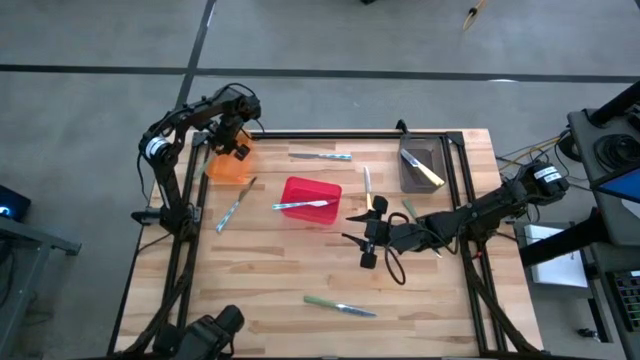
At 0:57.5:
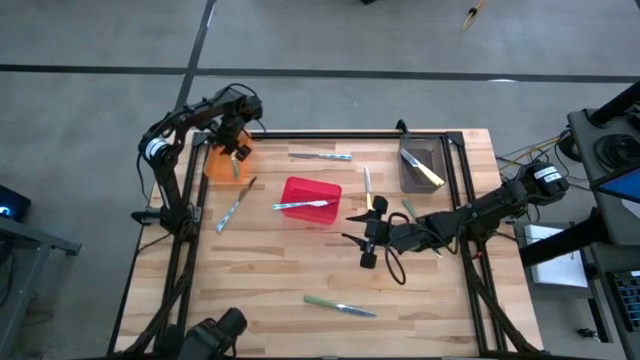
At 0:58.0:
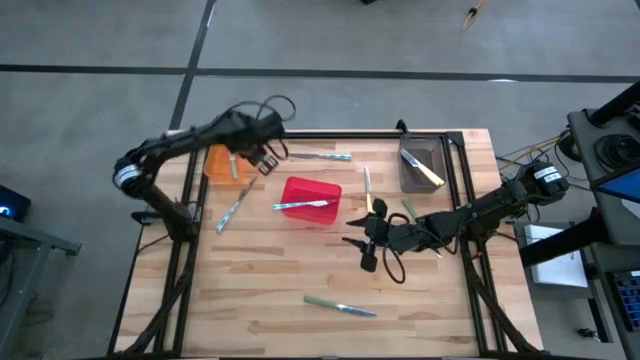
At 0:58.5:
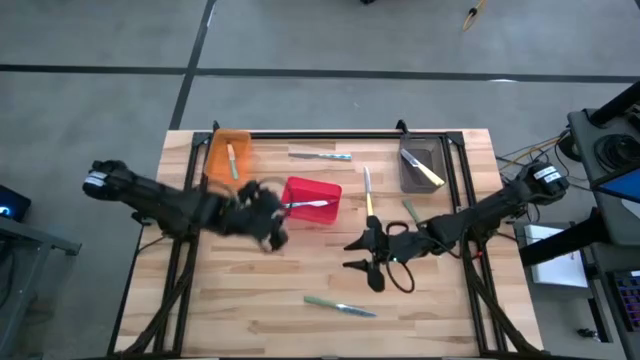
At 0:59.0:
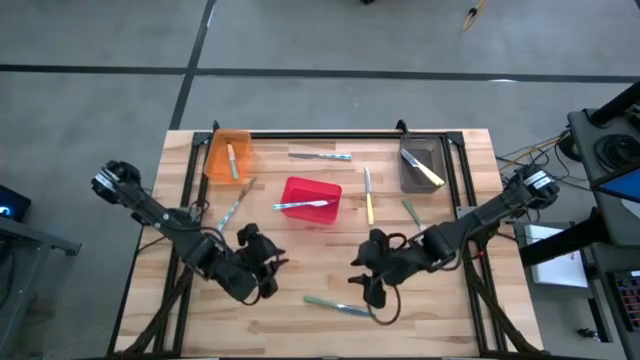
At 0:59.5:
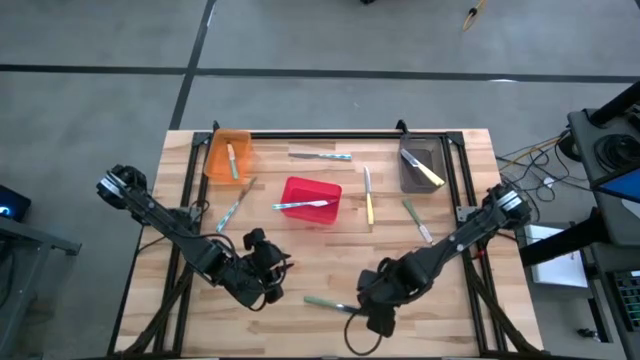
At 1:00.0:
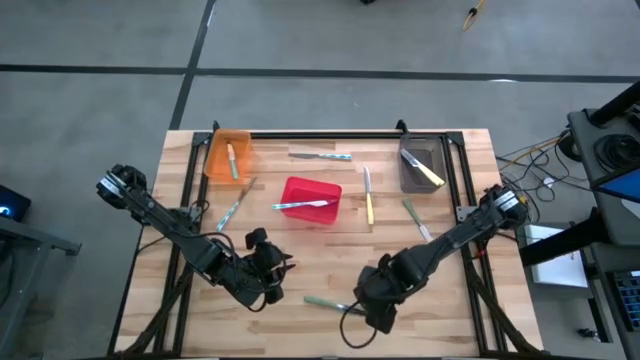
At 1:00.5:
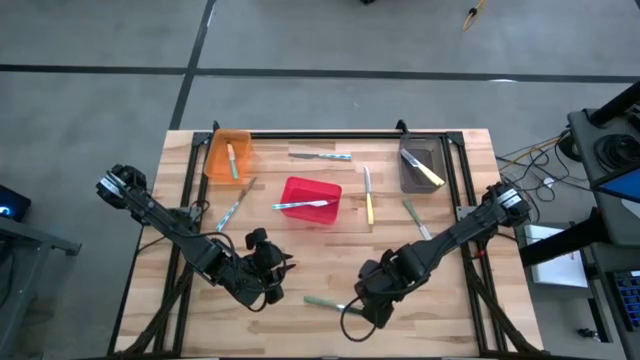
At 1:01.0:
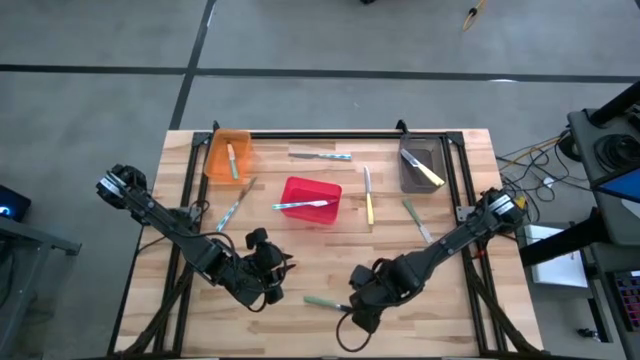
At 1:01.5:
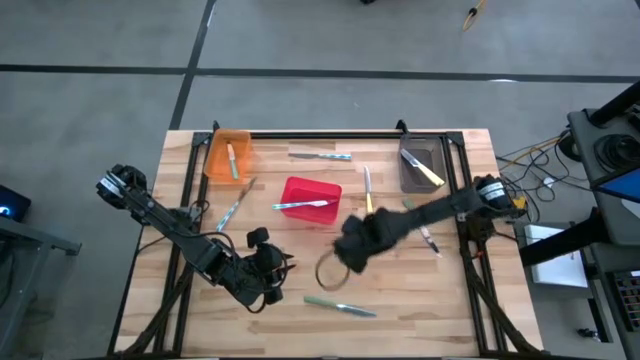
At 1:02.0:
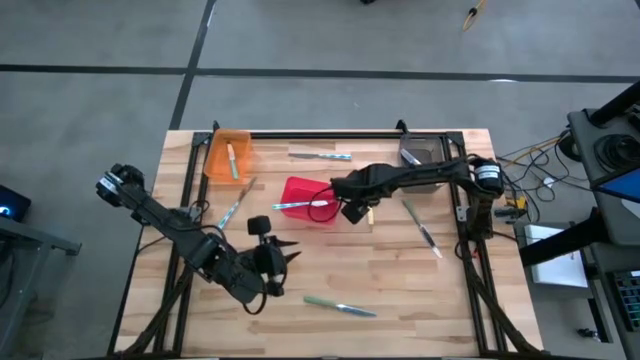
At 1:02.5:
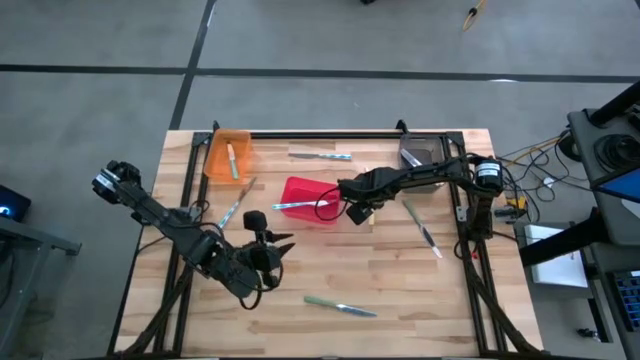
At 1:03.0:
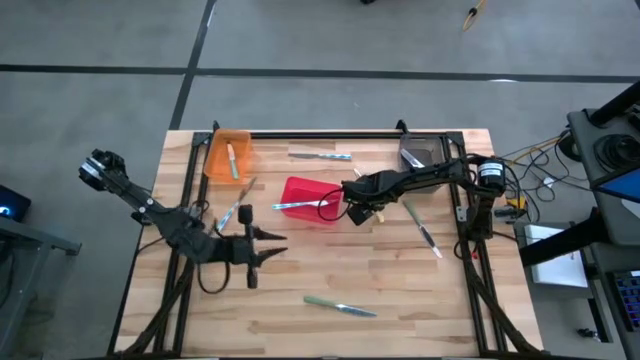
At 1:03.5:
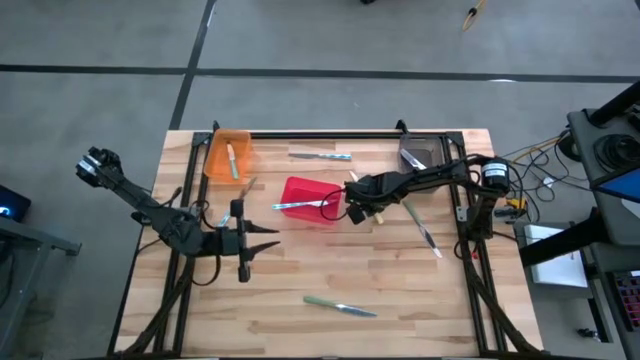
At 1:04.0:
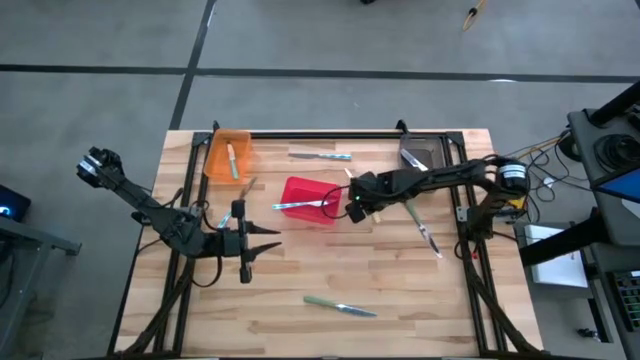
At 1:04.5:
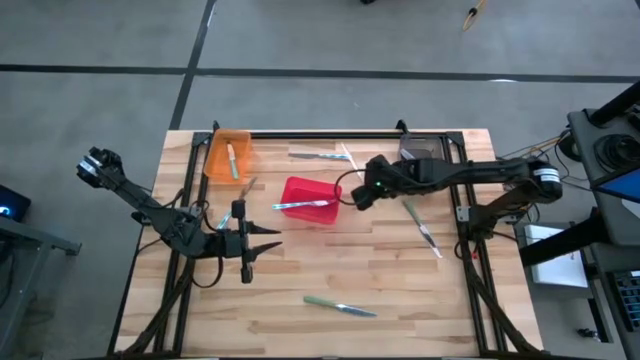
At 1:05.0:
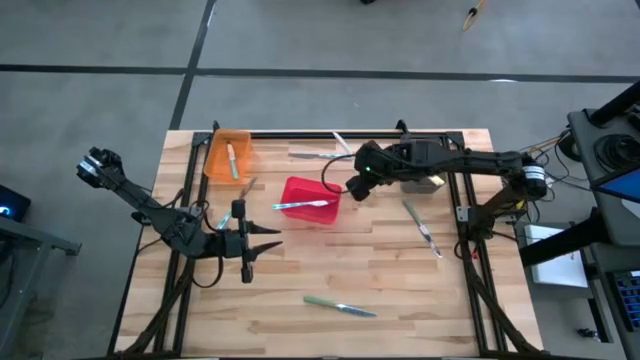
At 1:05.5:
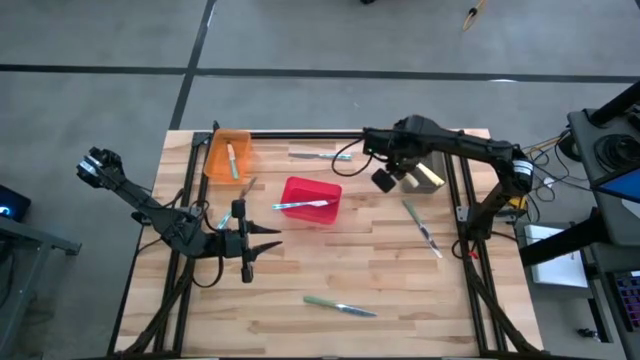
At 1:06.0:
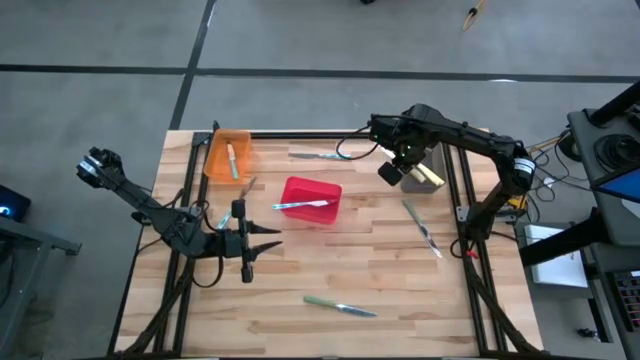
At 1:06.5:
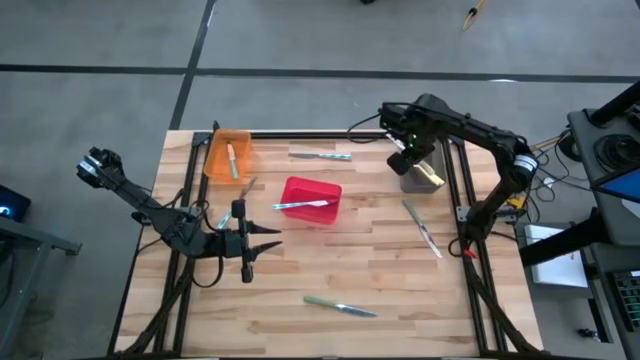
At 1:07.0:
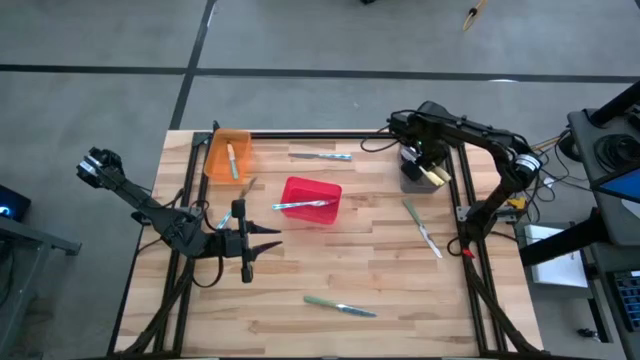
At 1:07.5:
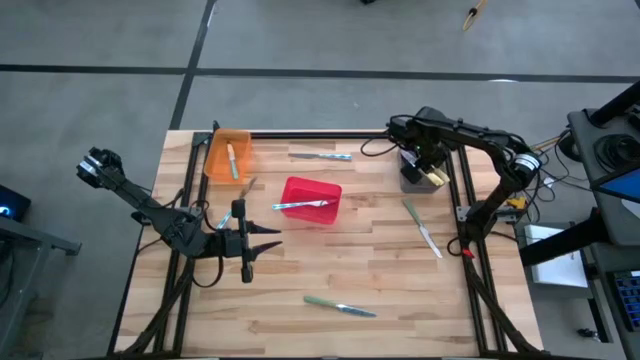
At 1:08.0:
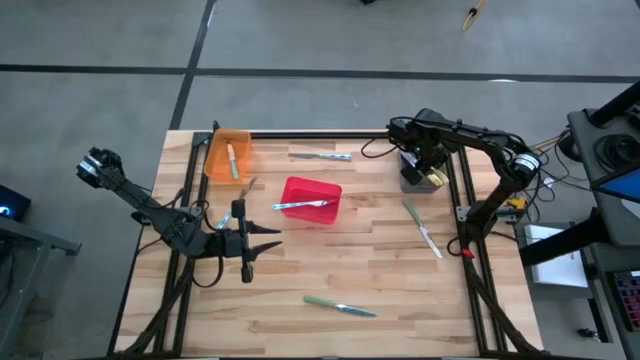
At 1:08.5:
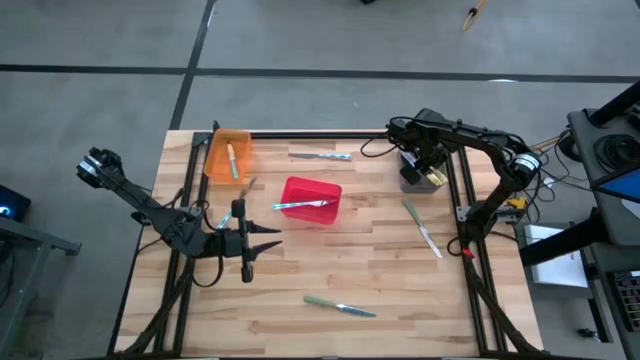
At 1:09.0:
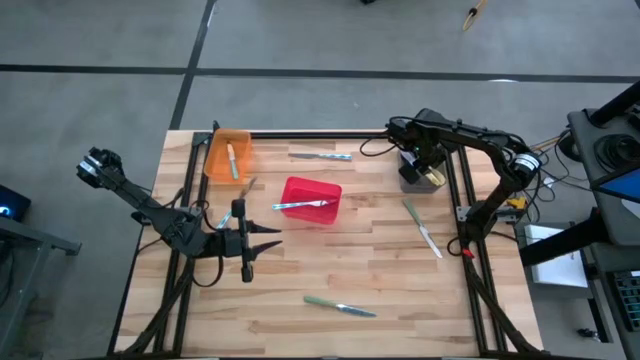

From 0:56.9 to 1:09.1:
Task: Sort silverware by color (type)
Put the yellow table knife into the black bin

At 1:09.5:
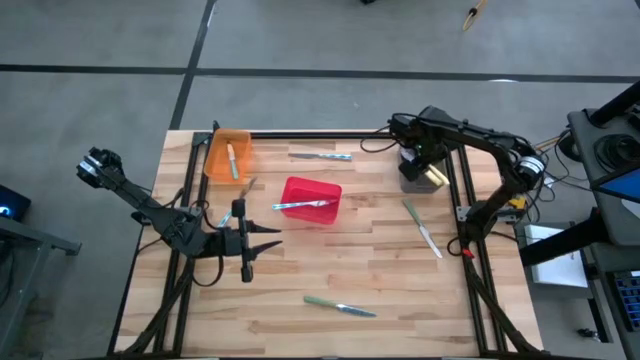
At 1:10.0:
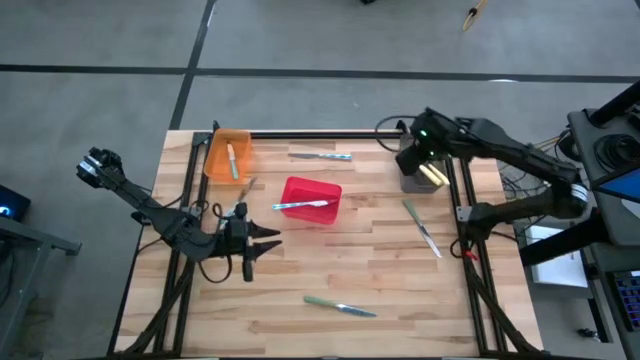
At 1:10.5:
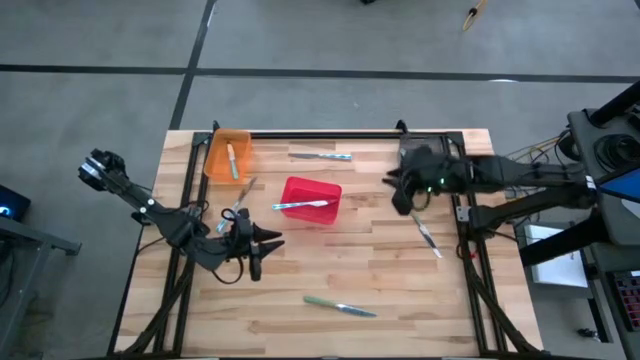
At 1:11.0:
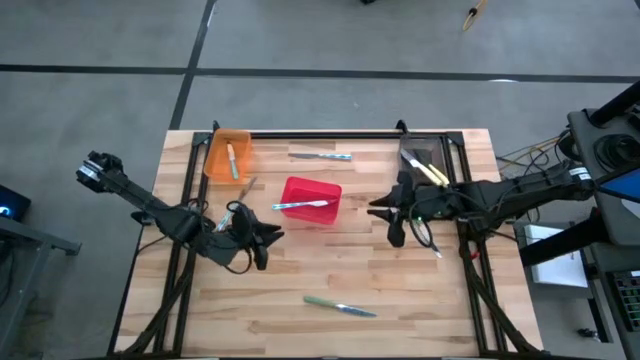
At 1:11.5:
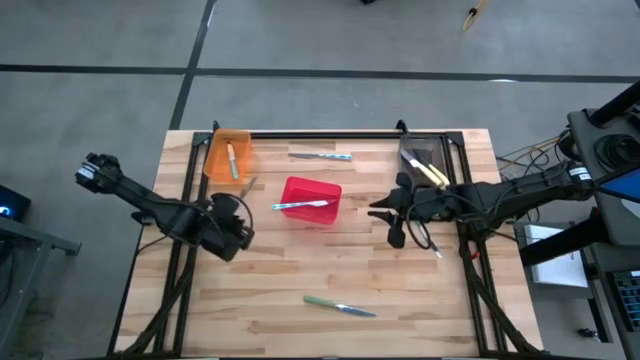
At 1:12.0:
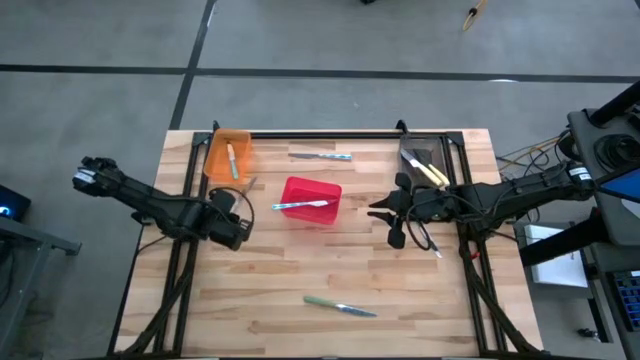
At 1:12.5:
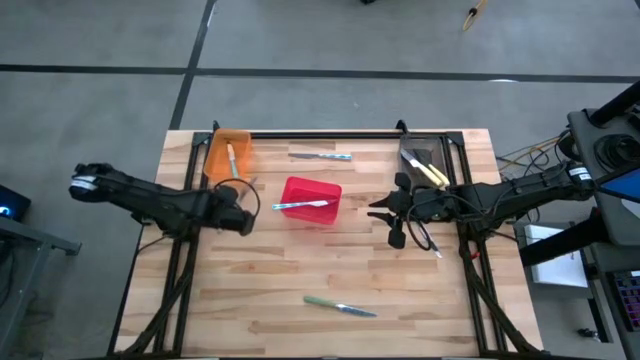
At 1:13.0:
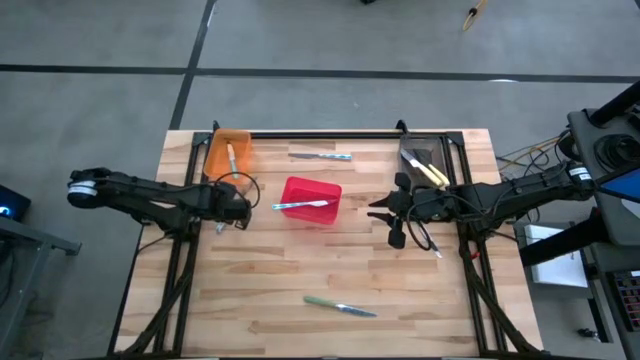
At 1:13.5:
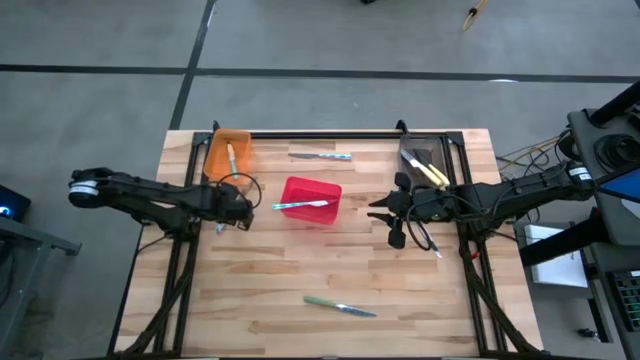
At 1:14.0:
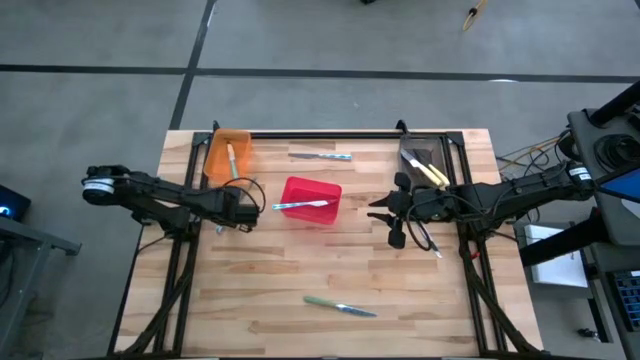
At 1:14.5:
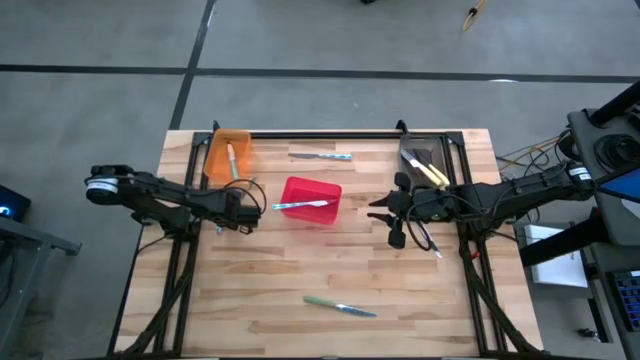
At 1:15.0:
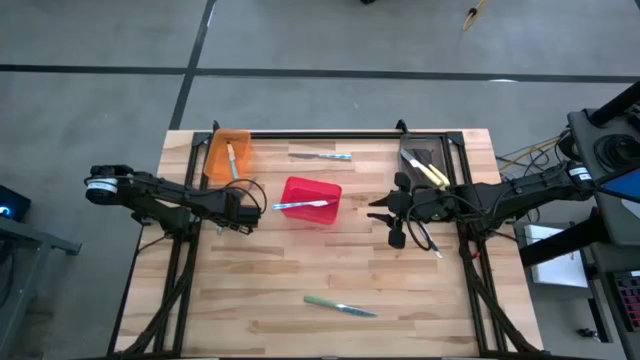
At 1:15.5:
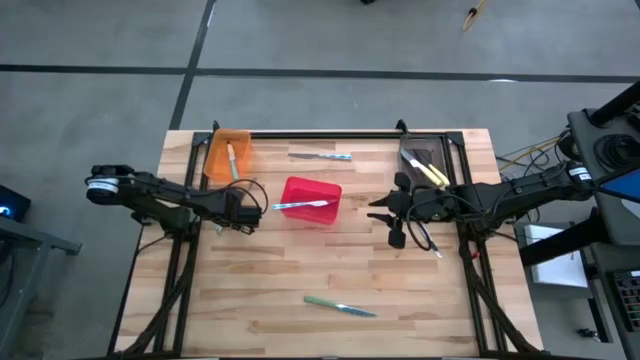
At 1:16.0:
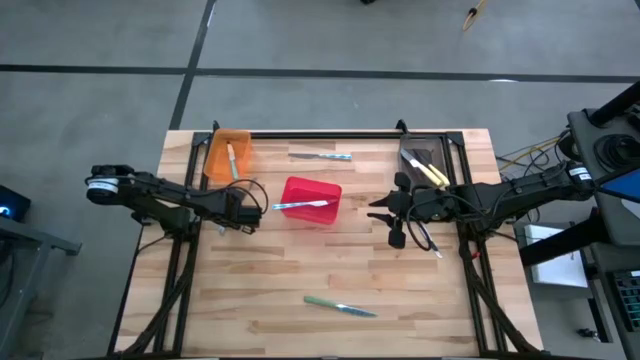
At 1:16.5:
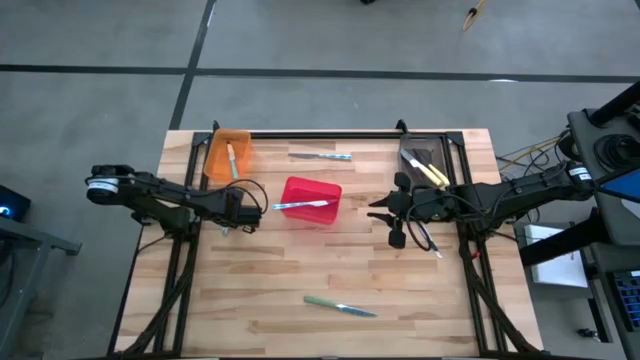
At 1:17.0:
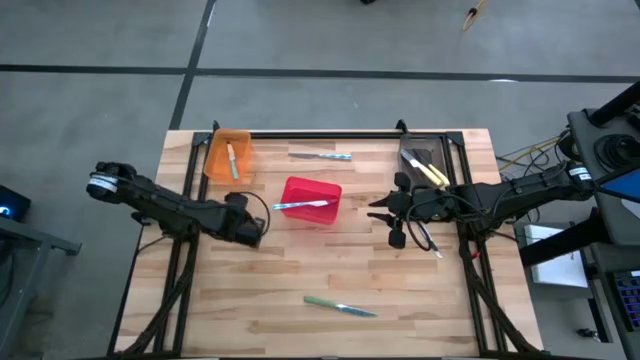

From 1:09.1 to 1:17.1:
Put the bottom white patterned table knife into the red bin

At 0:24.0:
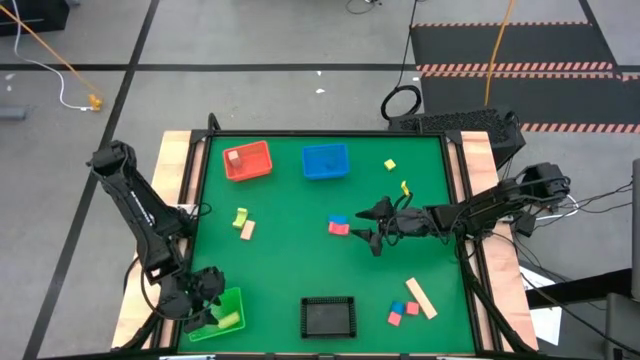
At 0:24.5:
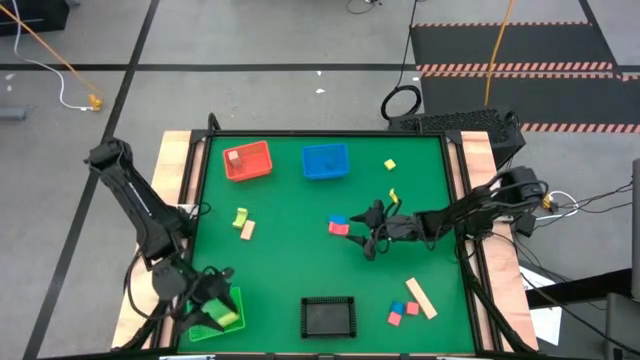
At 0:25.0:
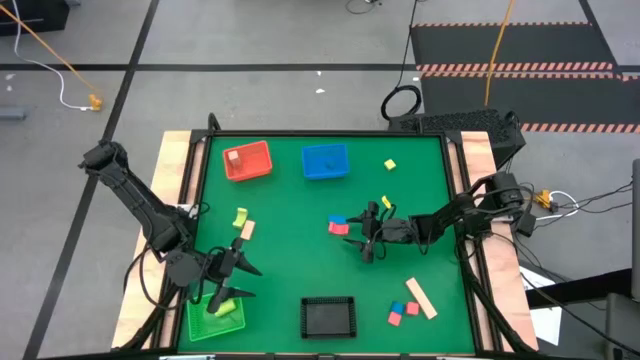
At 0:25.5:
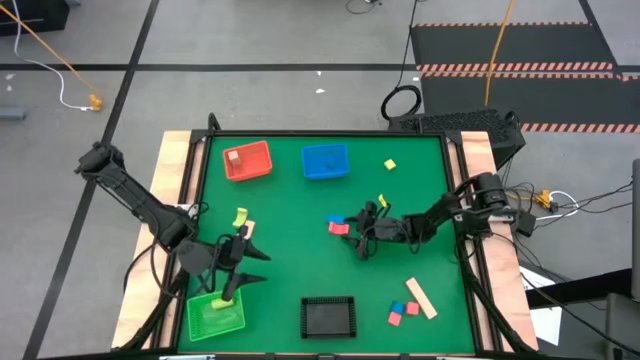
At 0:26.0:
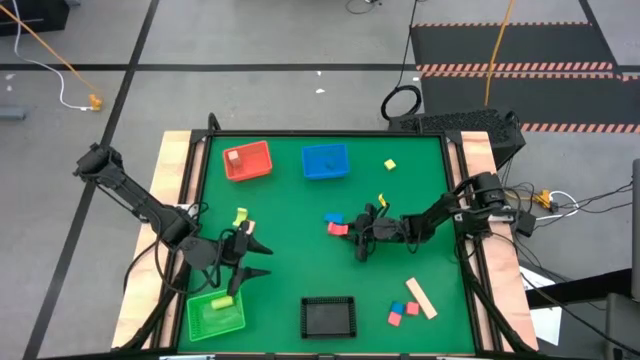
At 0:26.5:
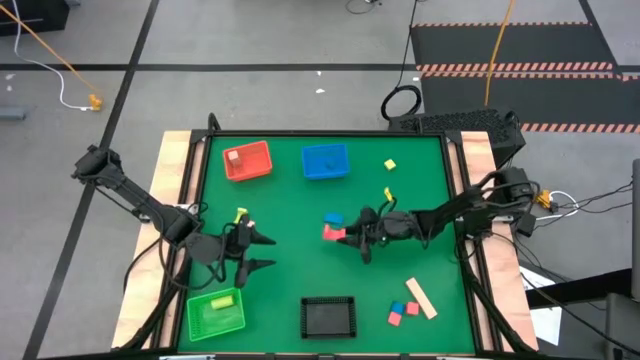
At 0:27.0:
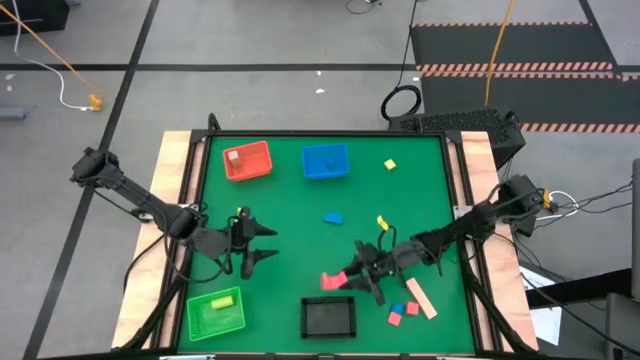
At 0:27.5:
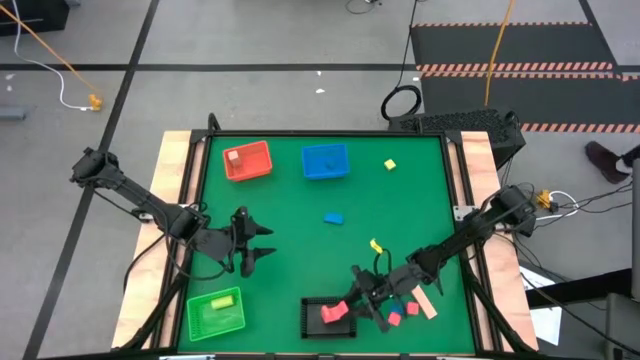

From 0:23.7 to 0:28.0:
Task: Sort & place blocks by color
Put the top red block into the black bin
